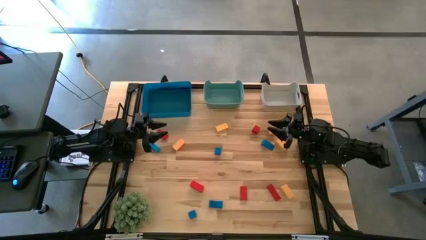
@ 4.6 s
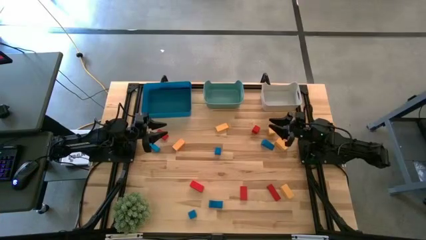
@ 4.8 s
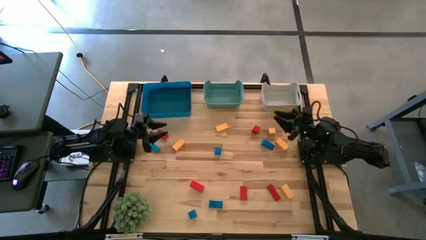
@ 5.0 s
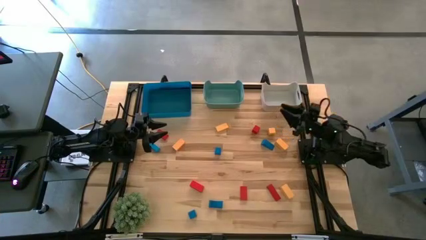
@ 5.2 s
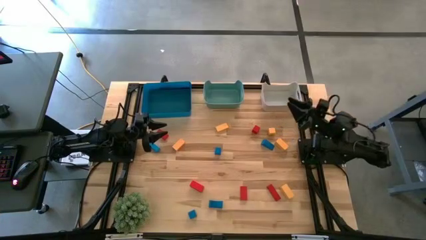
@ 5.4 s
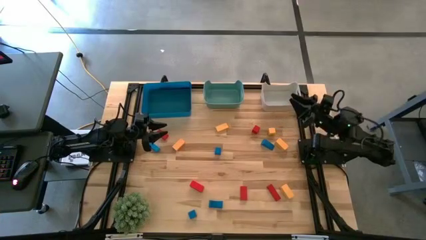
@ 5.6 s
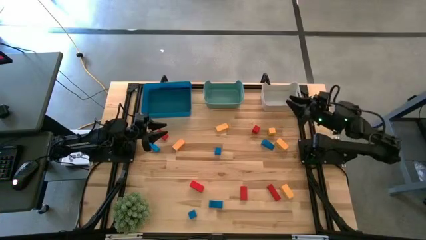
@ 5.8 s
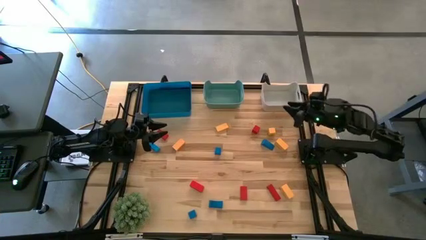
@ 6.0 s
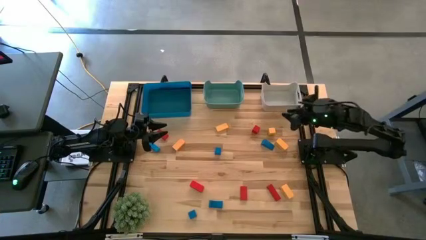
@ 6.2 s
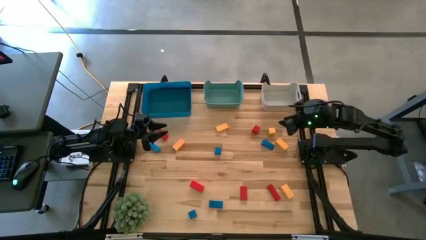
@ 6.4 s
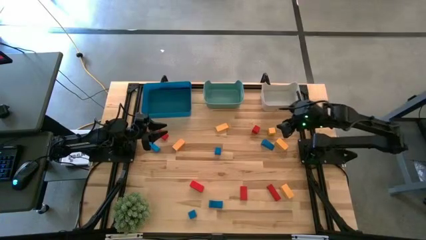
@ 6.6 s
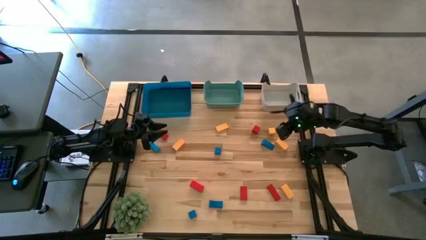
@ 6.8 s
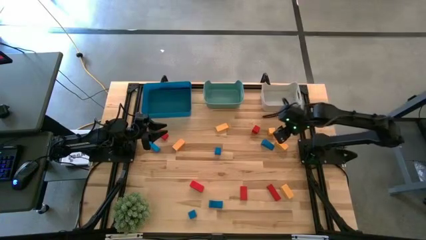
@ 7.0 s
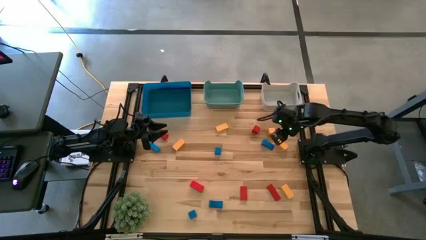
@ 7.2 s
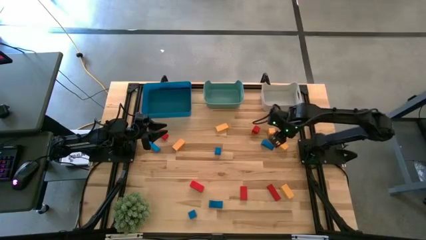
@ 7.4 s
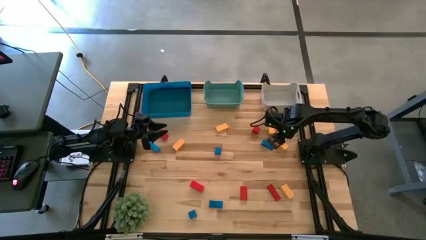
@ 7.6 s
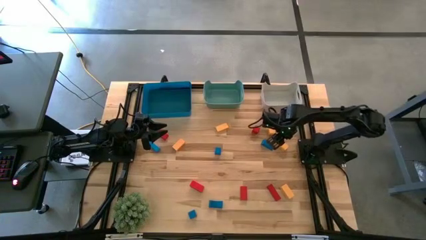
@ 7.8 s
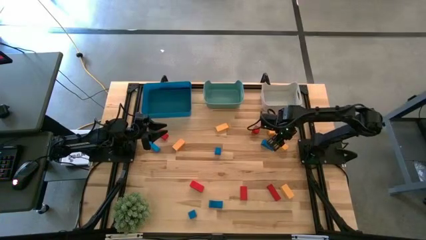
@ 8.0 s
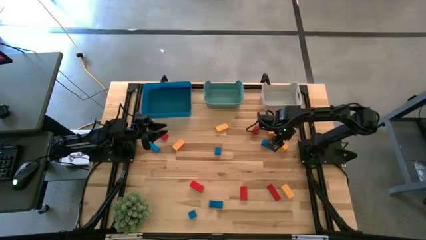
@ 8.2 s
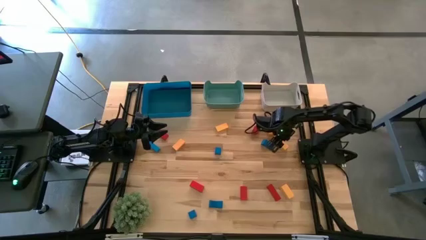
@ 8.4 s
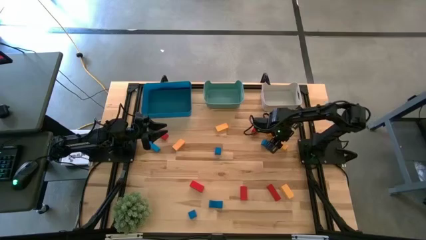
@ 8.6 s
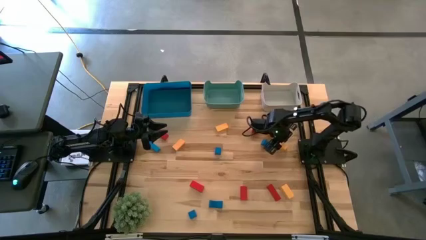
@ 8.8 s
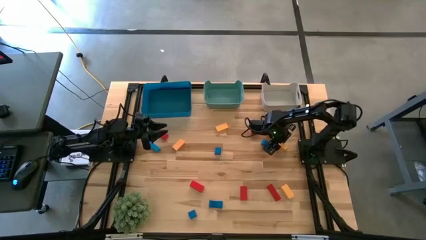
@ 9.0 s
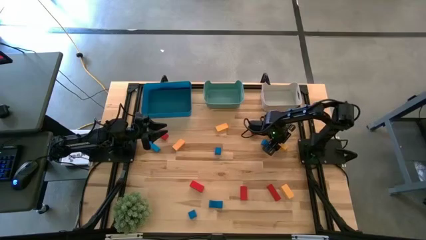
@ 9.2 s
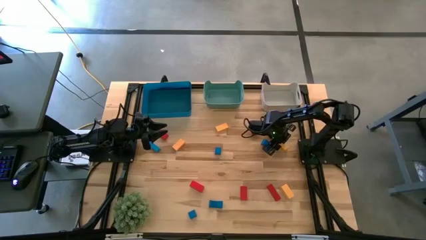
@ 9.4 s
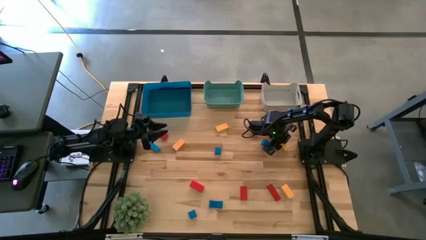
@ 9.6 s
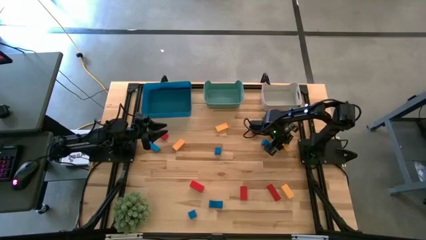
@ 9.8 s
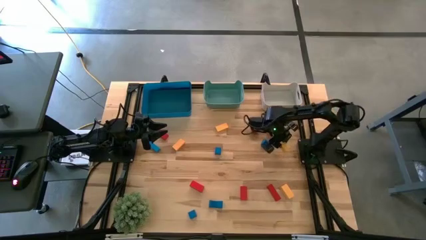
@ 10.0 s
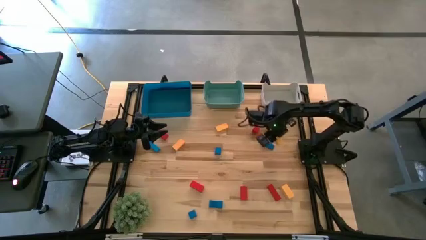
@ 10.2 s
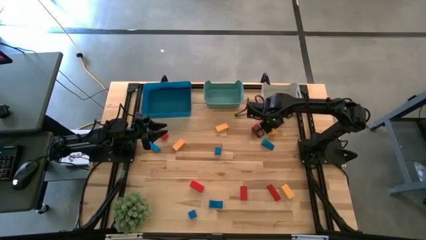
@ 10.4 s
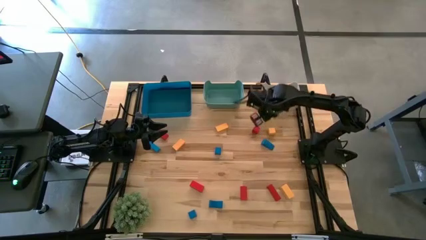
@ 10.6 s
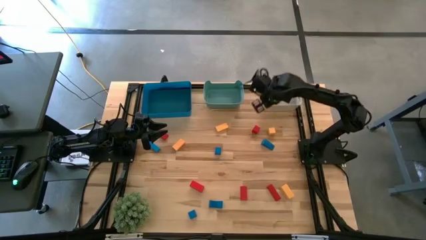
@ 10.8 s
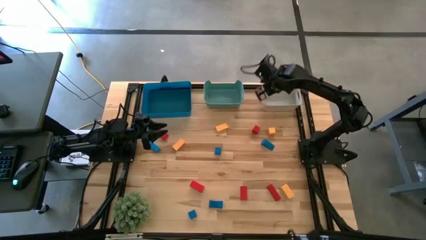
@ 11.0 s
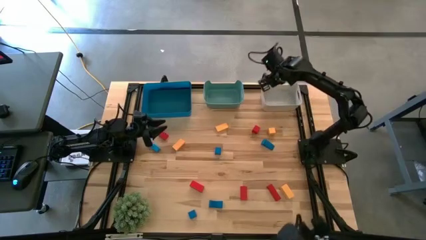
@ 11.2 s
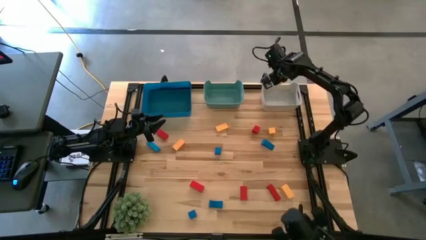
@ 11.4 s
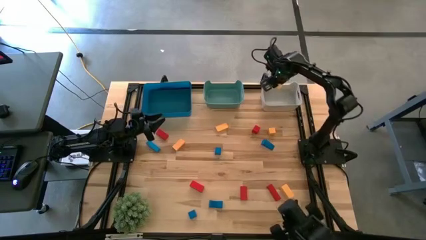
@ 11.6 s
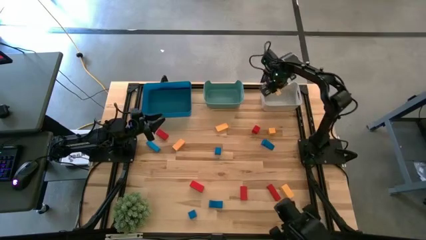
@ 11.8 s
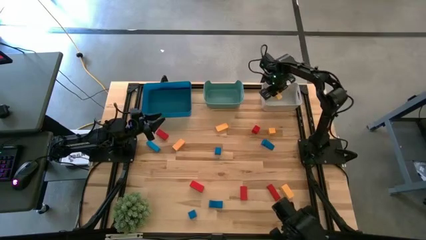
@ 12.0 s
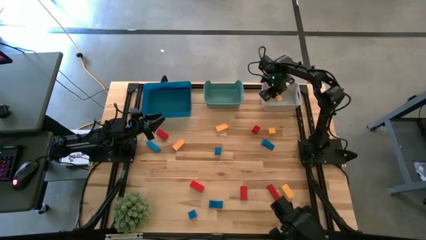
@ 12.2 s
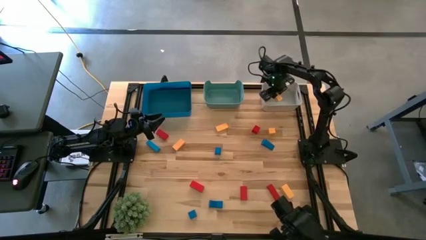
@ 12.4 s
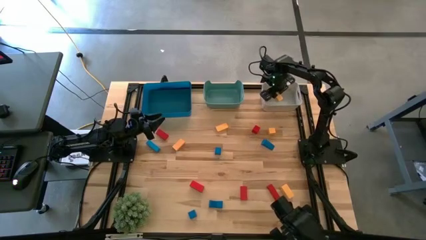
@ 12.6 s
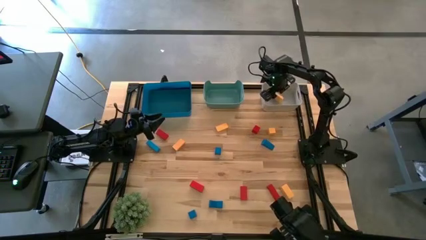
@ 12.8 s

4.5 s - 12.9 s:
Task: Sort & place blocks by color
Put the yellow block into the gray bin

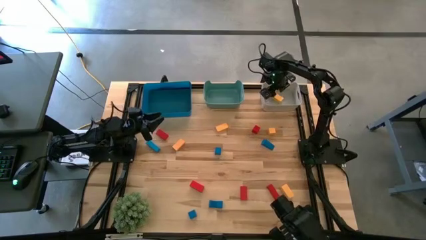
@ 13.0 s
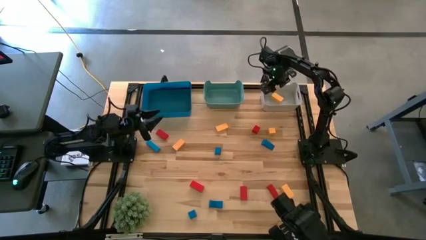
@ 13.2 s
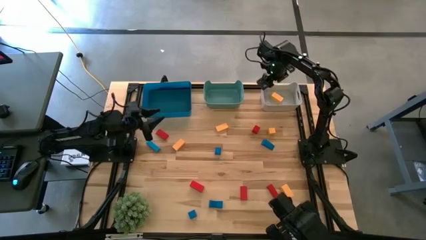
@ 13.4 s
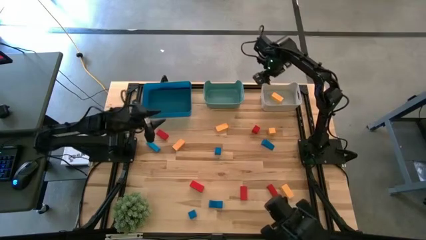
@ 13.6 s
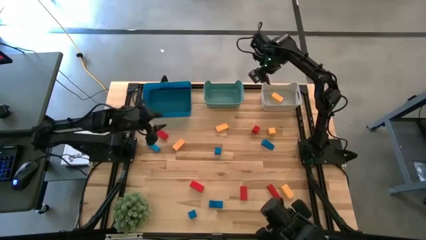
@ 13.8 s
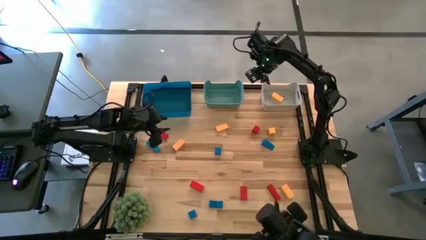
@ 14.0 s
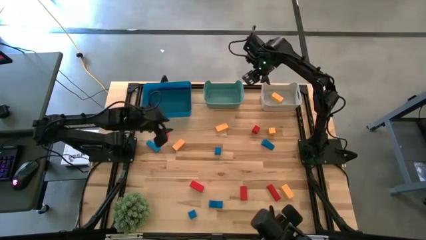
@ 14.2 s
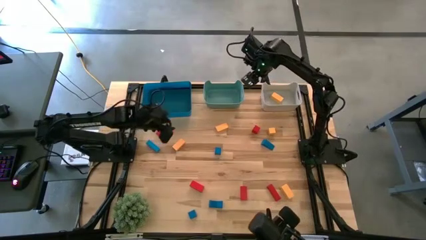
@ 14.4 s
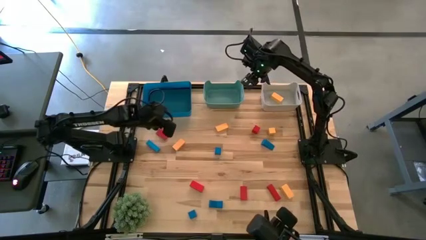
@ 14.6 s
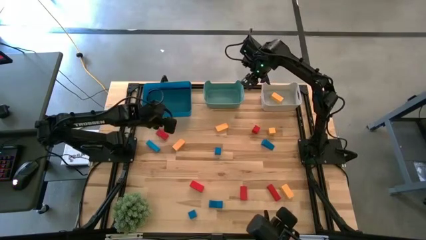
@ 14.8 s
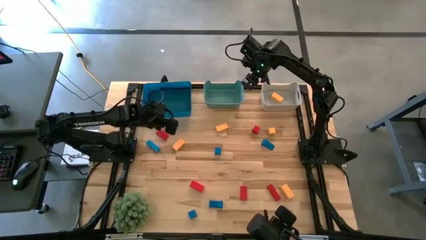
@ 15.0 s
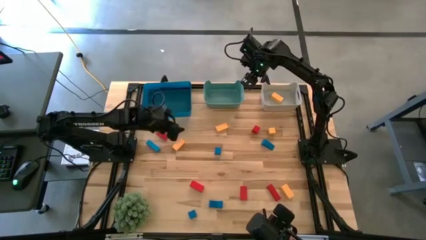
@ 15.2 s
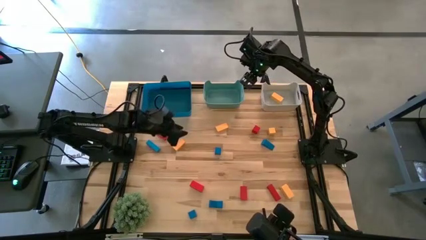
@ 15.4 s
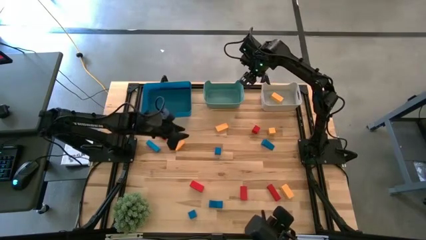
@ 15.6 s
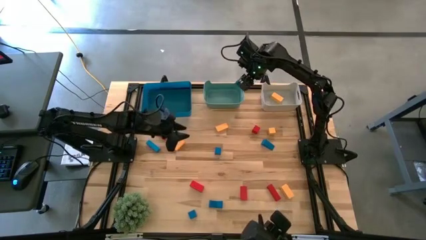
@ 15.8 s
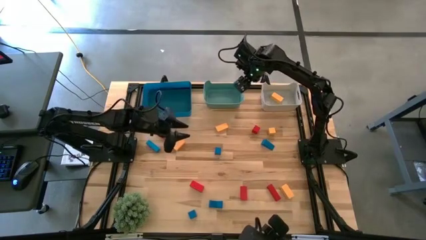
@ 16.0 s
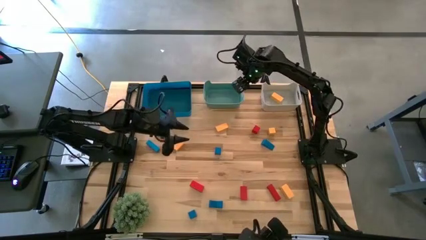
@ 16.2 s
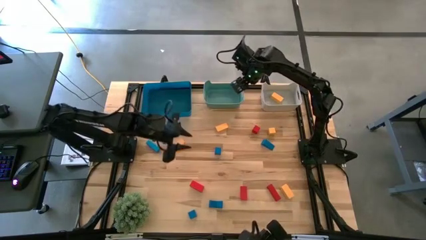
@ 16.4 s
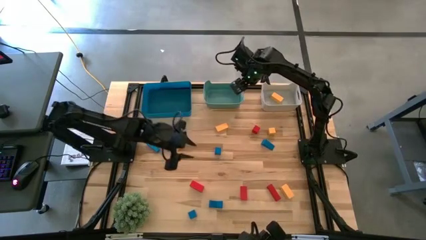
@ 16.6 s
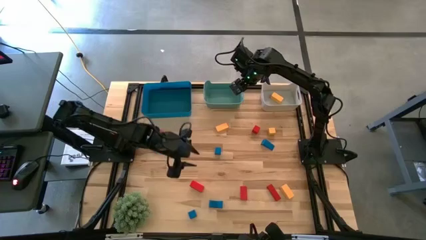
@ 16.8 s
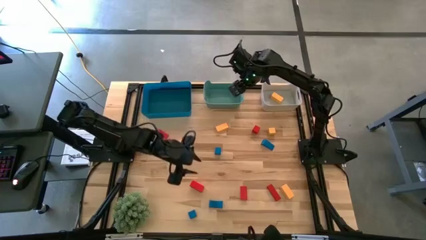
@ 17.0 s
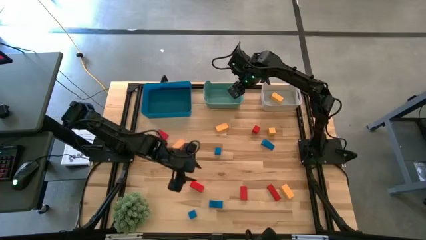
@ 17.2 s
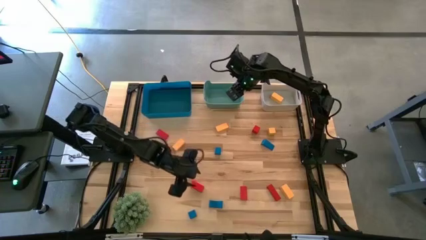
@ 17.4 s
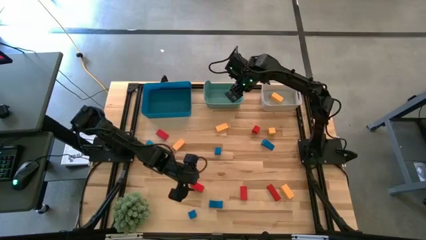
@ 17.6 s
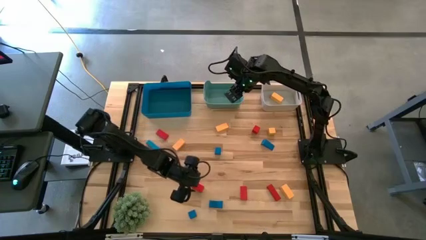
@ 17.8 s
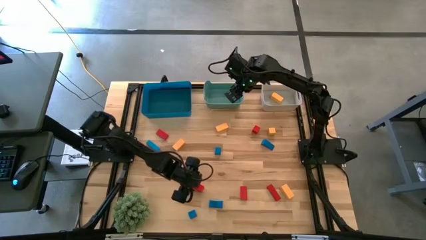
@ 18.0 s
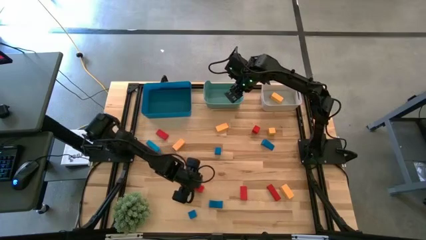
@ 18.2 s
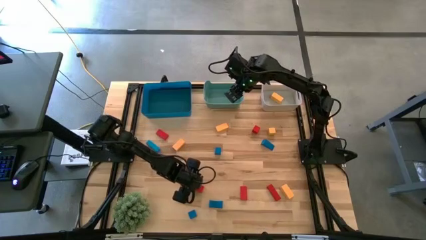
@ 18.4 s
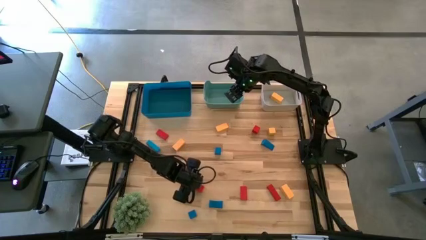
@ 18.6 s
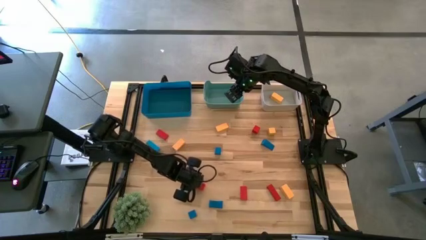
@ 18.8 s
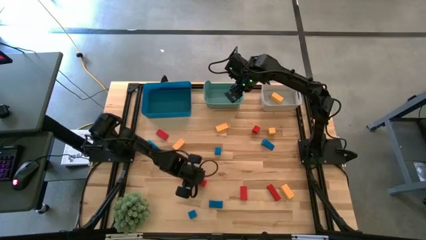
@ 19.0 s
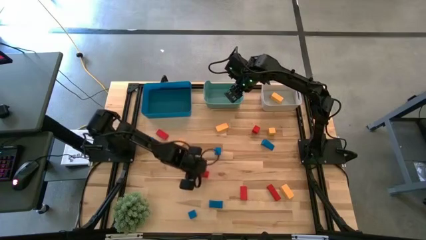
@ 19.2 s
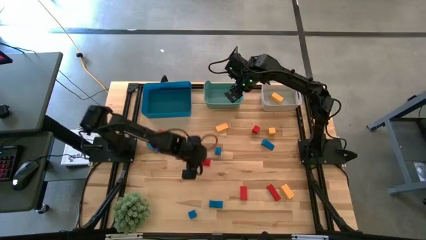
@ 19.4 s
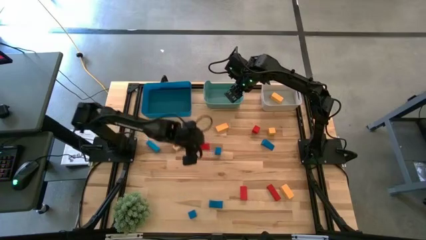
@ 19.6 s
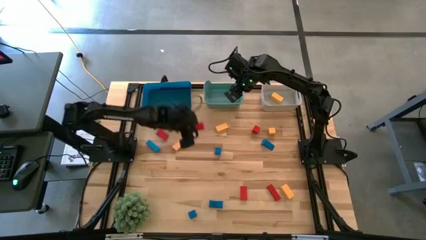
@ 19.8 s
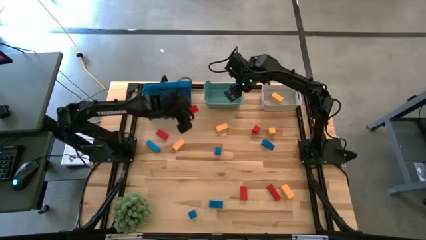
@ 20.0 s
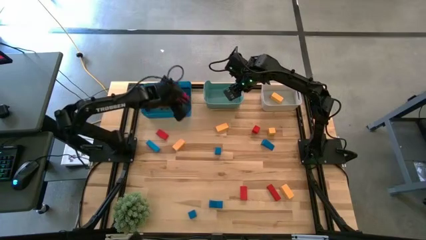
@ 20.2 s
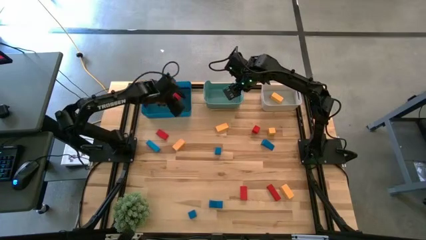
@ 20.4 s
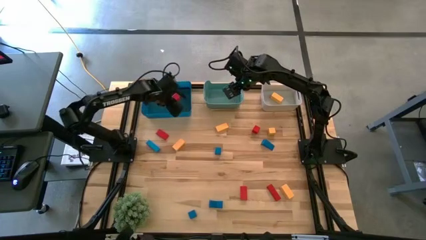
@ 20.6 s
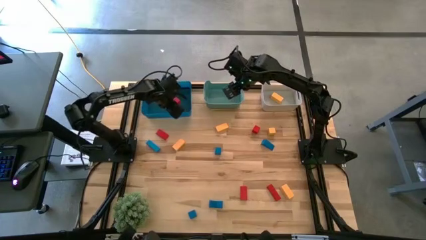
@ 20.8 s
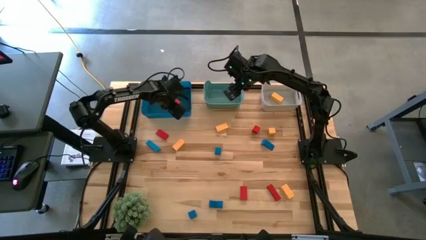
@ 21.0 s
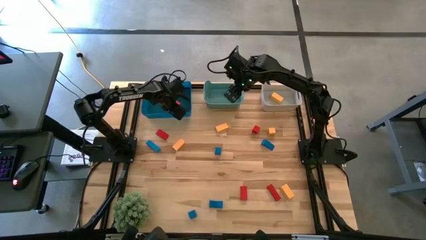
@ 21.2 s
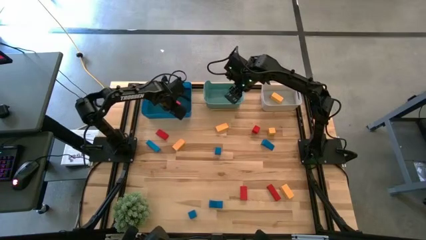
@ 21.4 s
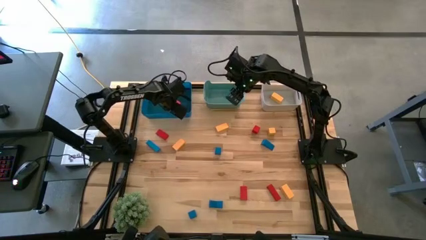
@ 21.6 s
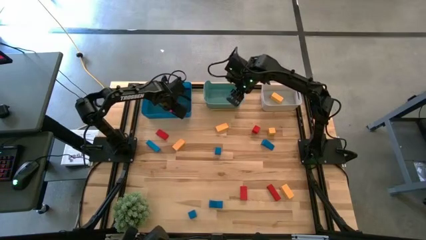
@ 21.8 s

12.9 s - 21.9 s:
Put the red block into the blue bin
